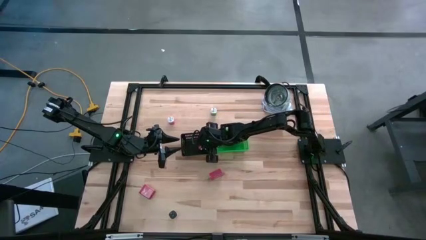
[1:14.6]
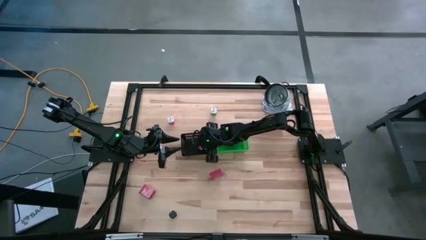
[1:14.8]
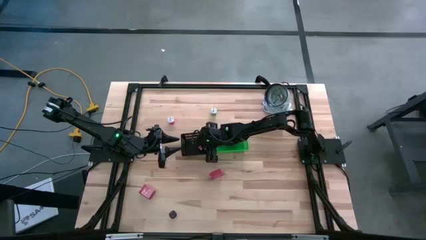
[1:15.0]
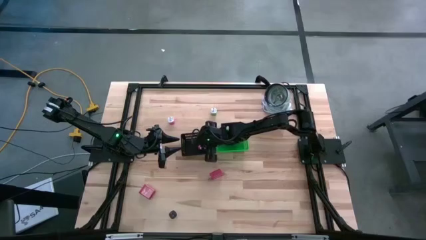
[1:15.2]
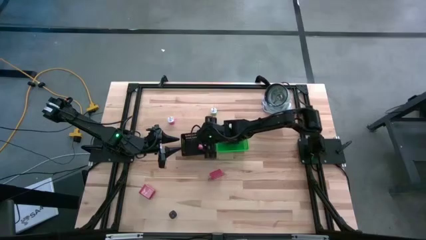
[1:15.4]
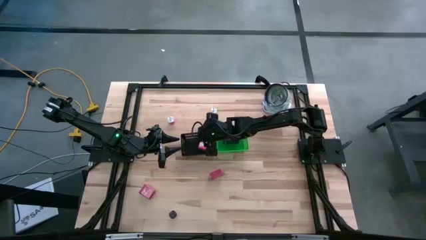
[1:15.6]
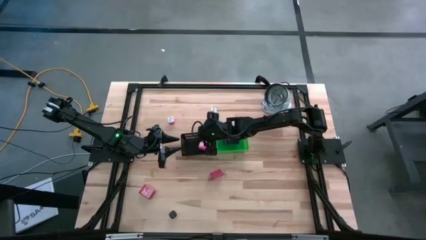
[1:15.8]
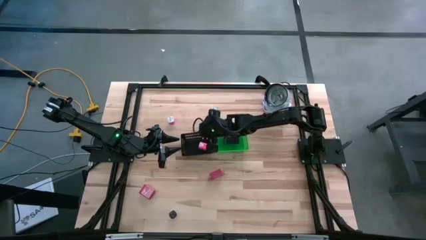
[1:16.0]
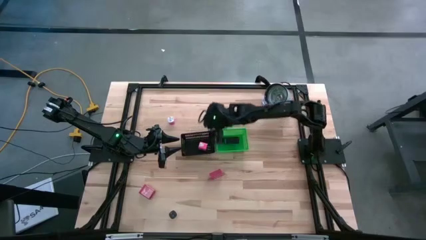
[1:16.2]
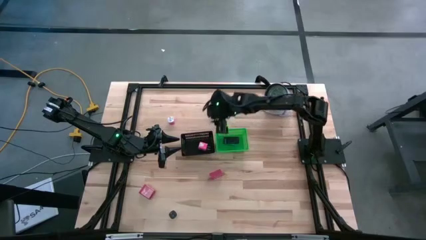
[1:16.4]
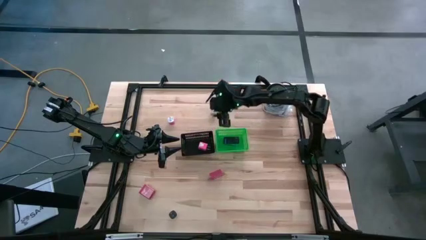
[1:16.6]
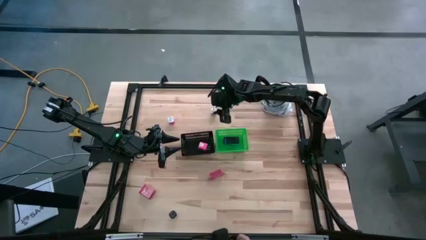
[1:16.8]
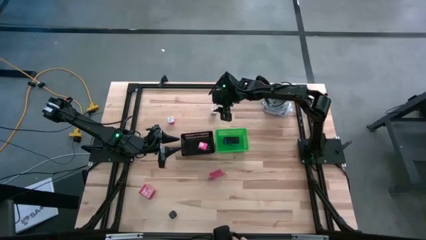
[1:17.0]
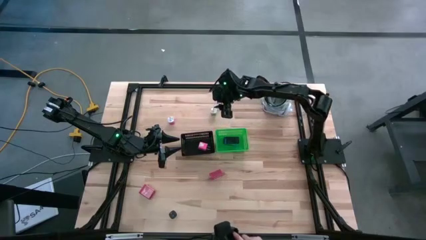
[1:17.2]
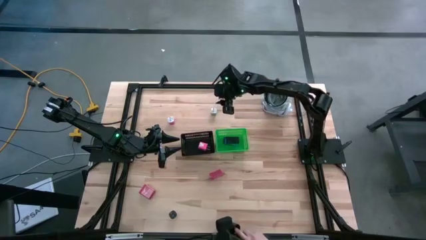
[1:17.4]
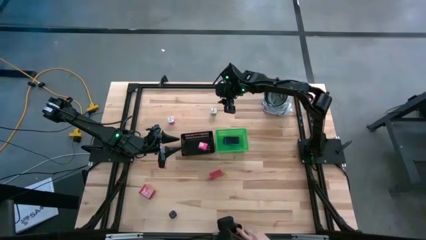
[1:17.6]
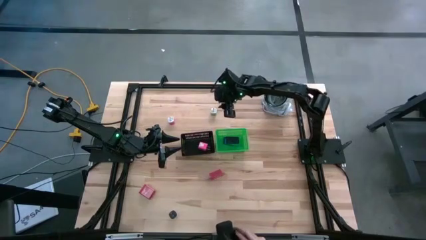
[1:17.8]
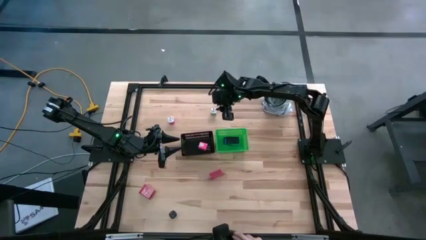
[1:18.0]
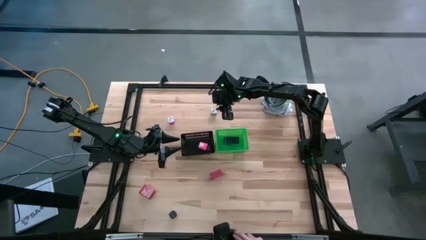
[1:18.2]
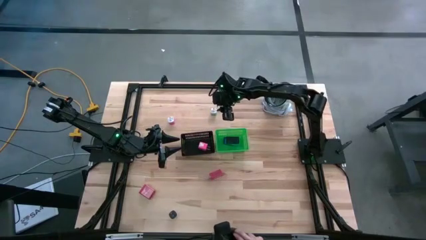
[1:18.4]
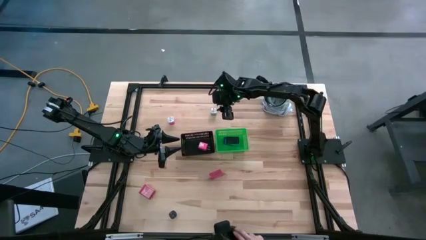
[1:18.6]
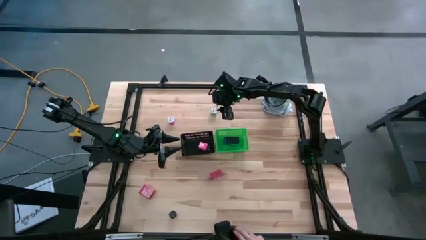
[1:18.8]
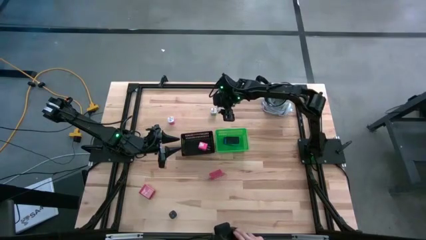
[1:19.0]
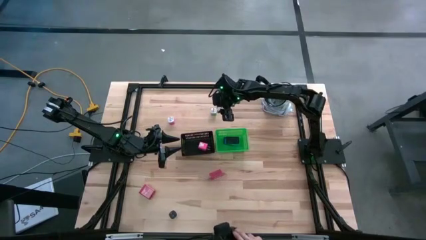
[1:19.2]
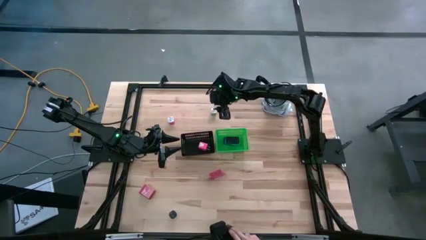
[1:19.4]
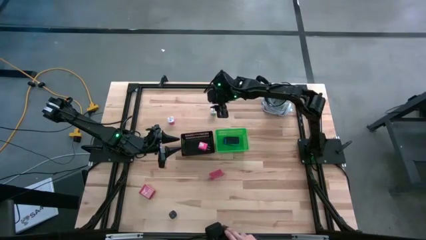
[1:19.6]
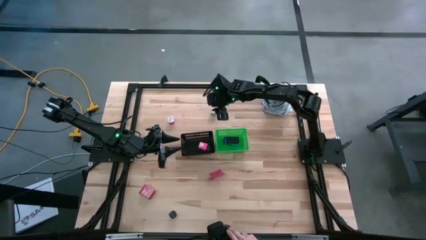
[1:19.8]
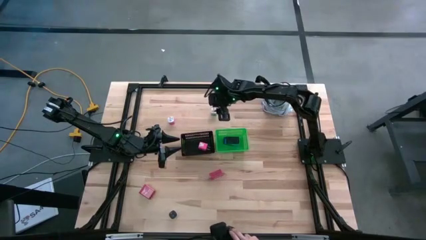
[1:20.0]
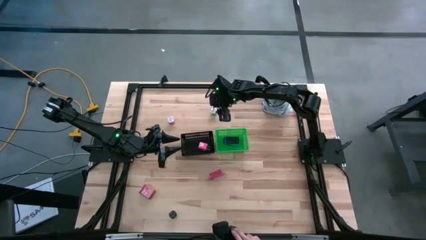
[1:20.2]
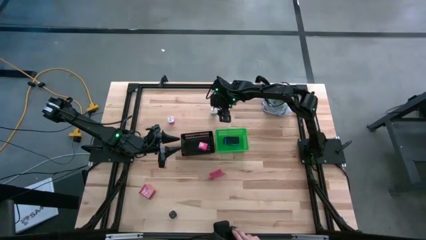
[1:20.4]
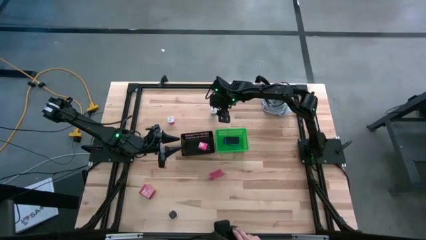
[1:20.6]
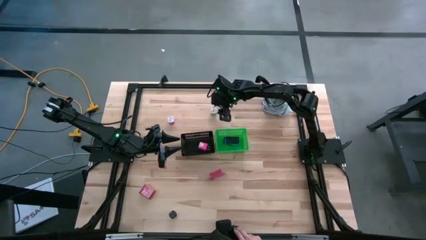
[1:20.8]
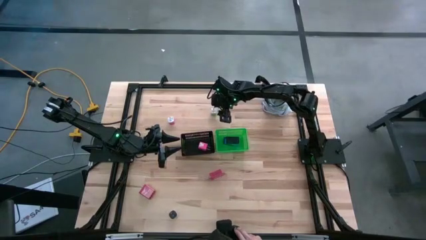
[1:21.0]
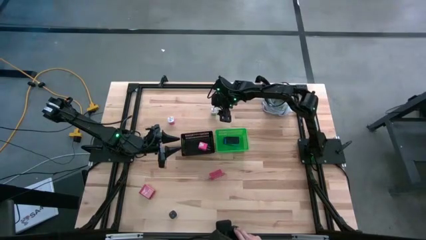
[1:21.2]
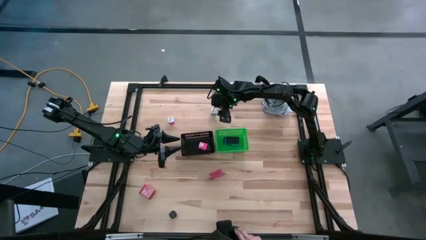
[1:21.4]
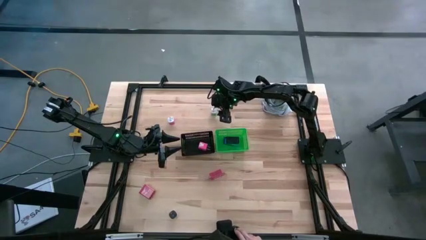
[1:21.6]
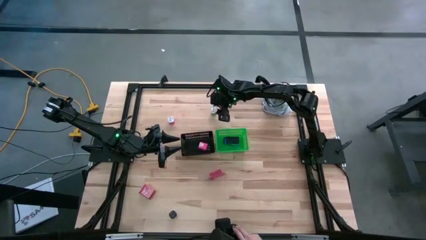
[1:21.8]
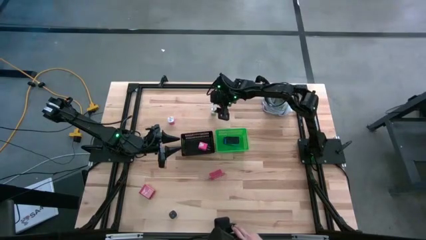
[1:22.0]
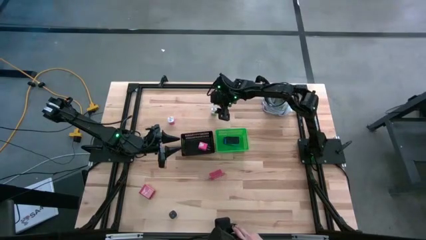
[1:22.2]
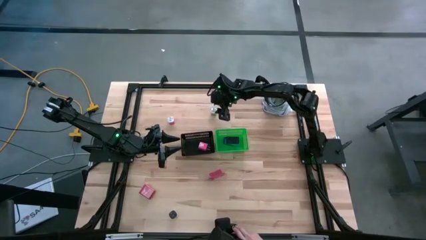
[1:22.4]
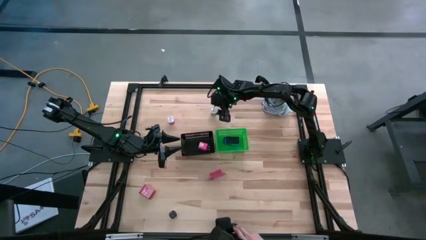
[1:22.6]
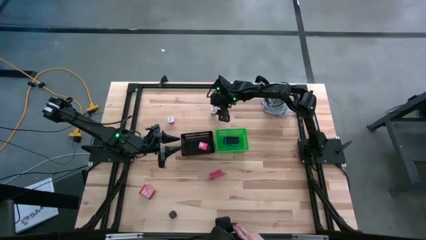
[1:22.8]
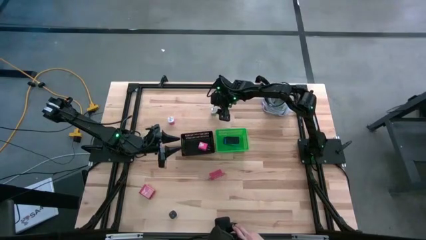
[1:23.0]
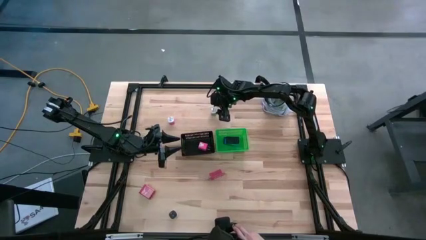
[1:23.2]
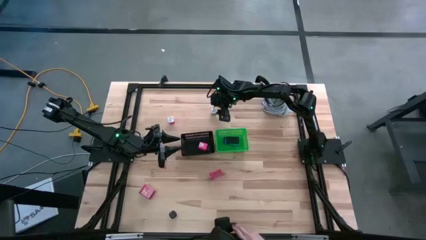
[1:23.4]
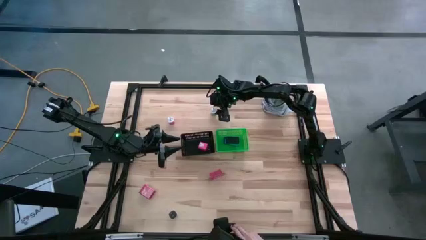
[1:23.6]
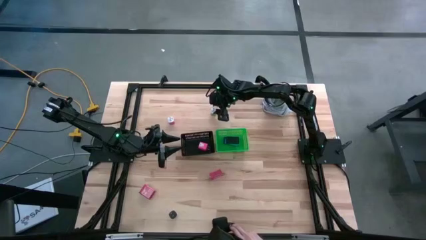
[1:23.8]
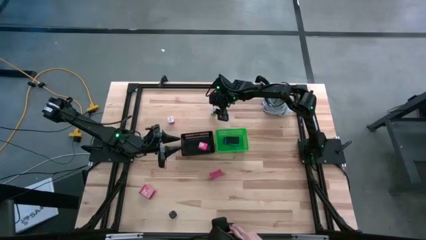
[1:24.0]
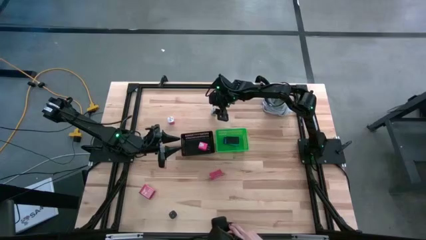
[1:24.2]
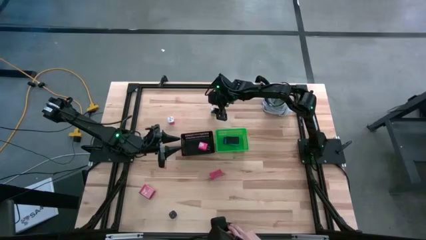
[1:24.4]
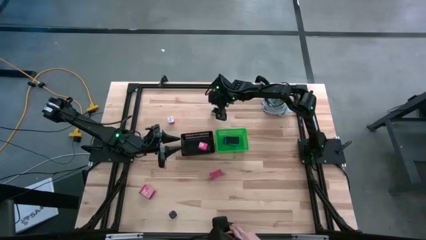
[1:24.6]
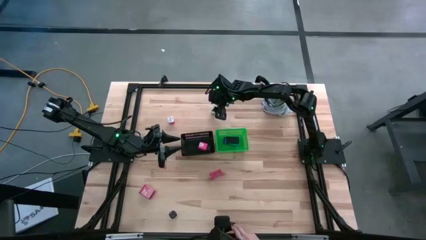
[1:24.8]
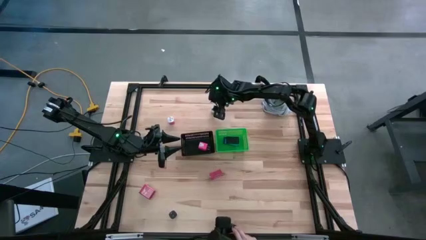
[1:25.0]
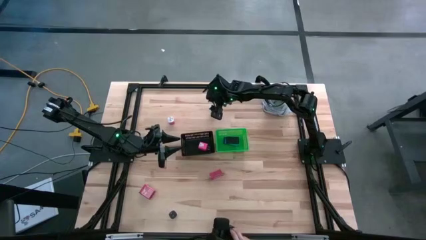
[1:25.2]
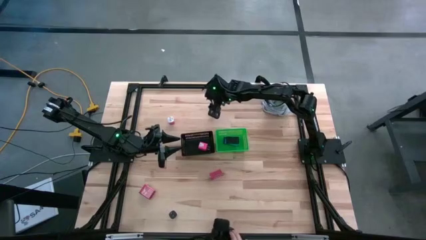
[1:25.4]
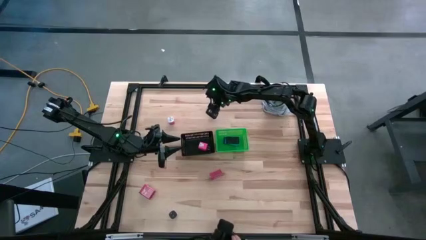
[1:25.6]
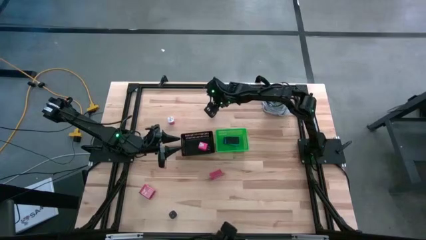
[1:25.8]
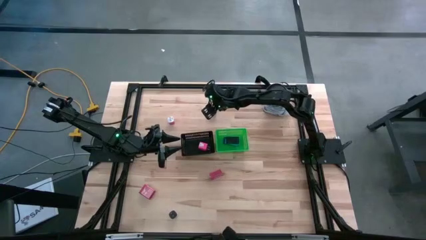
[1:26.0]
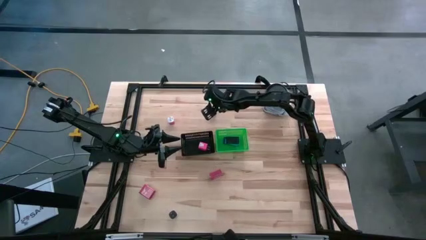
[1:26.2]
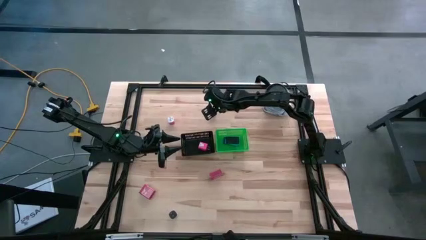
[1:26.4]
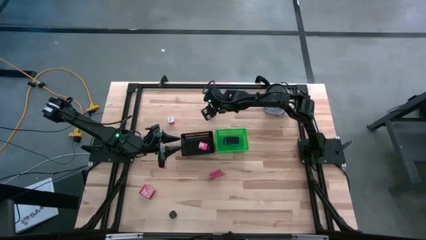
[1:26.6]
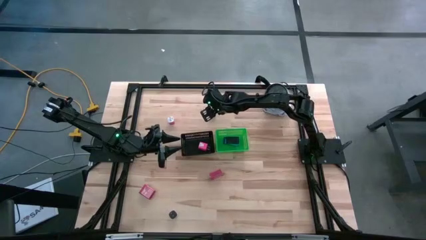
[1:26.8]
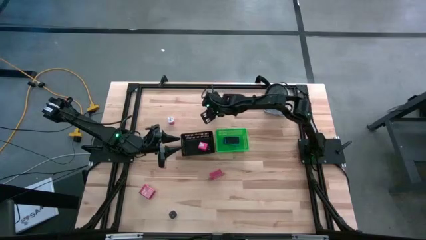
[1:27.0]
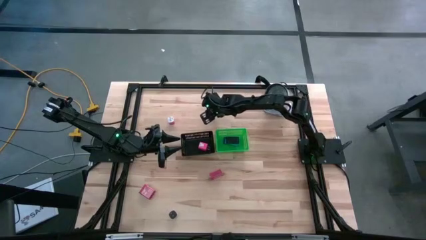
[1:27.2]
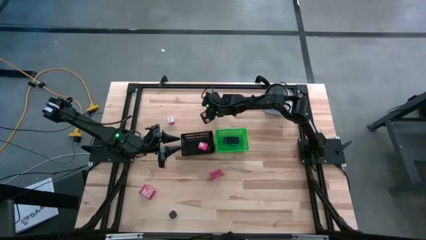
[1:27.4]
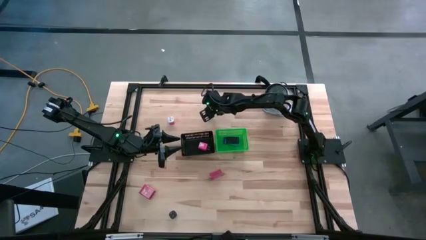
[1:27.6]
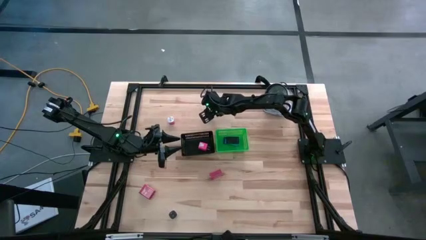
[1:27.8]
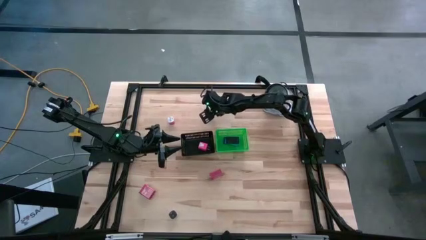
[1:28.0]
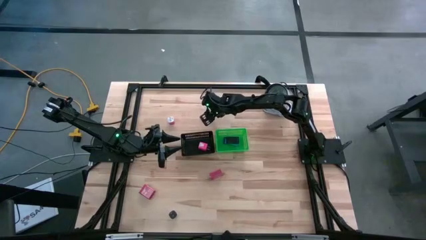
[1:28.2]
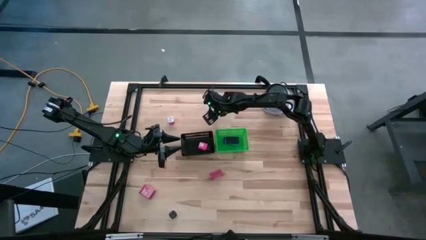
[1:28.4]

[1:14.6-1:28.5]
Task: Pick & Place Office items
Put the green charger adapter into the black bin

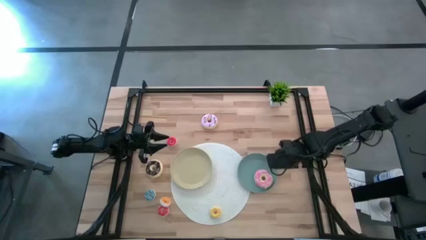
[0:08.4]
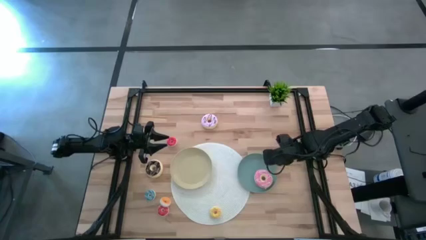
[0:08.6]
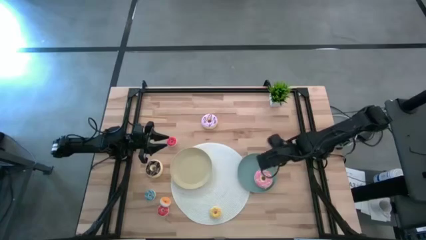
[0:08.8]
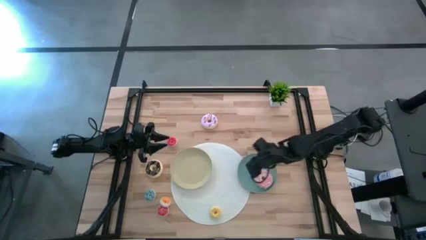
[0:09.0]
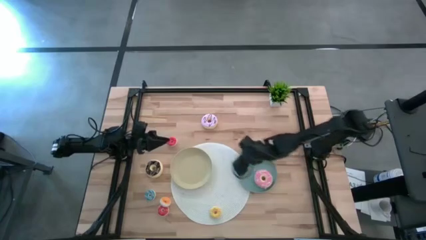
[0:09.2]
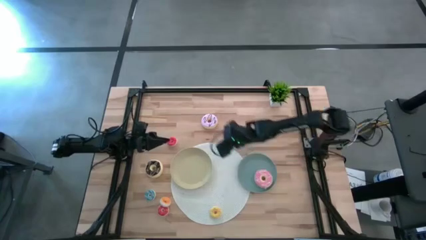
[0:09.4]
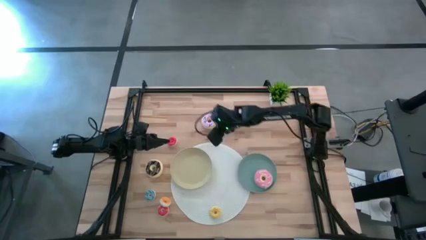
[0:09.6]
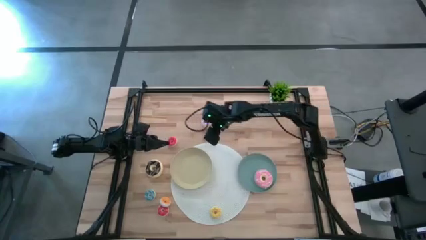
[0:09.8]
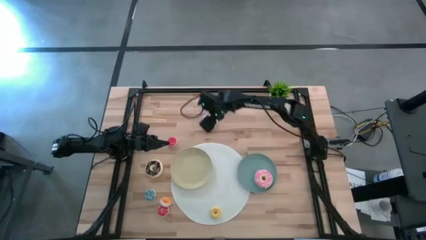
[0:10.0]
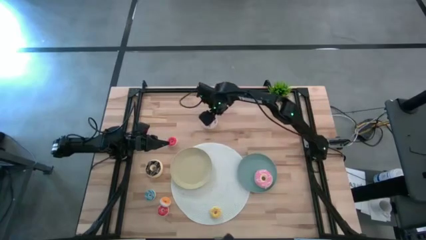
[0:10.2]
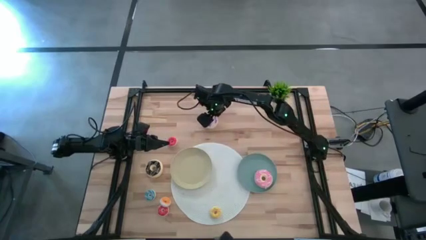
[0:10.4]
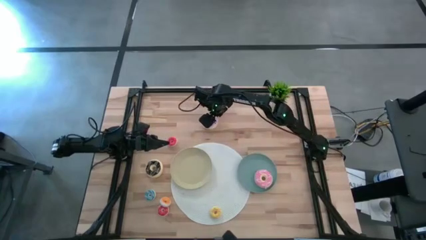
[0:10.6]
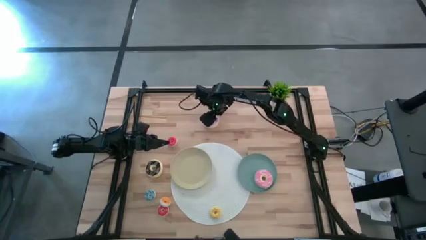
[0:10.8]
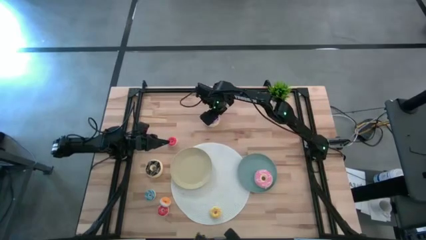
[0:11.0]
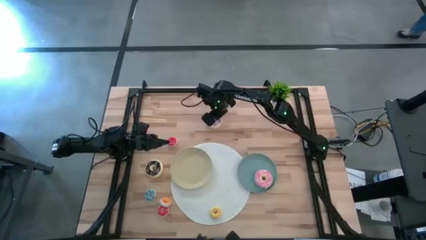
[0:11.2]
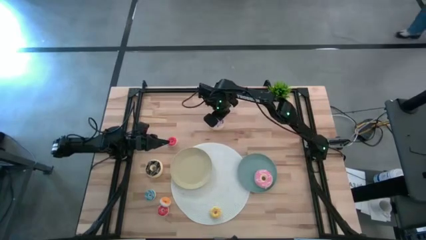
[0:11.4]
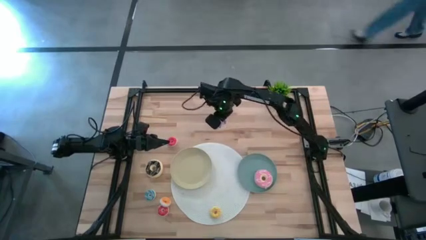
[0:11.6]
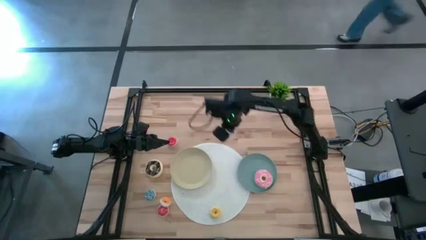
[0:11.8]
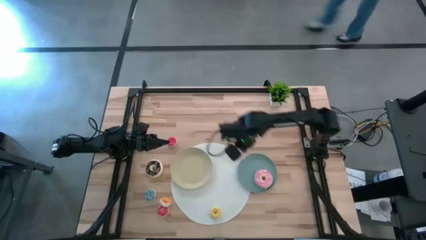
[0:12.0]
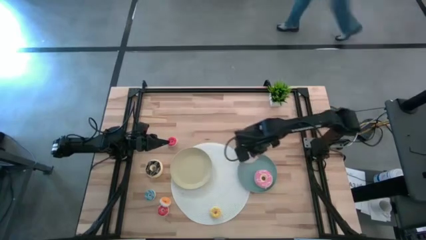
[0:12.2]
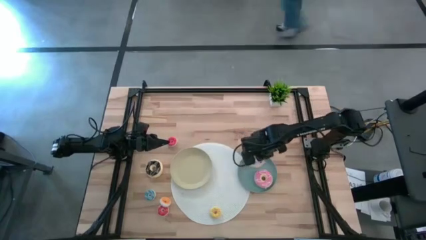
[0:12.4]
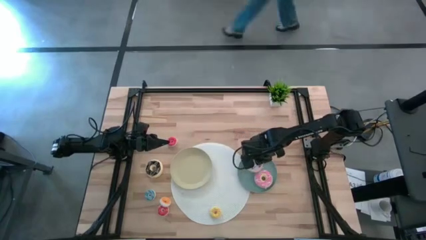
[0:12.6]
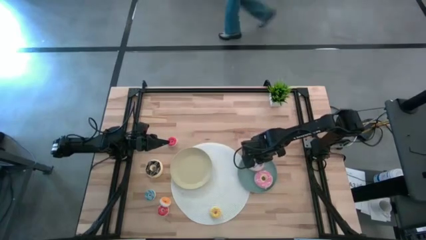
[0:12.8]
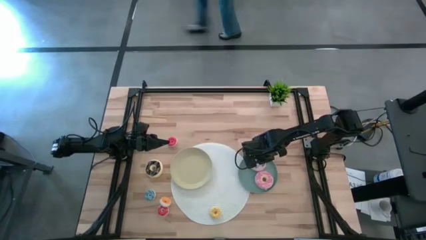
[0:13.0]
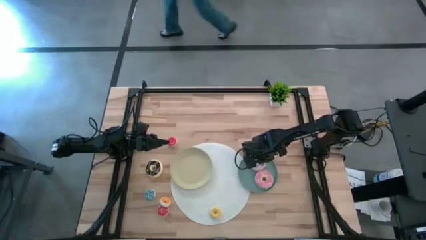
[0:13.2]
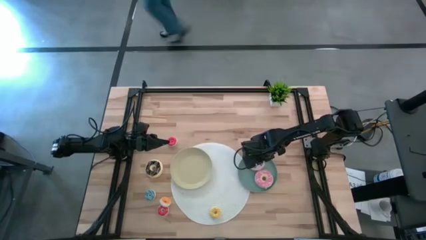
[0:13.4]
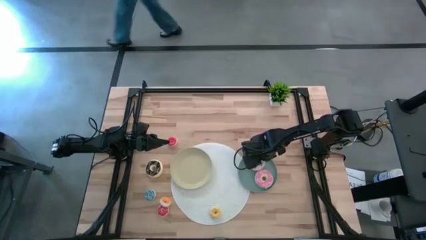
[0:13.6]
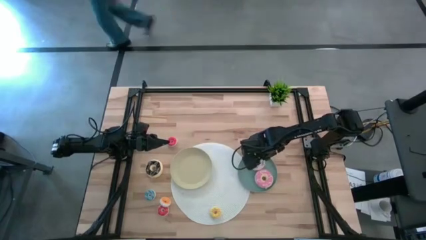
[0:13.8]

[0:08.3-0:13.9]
Task: Pick & Place donuts
Put the big violet donut on the blue plate
